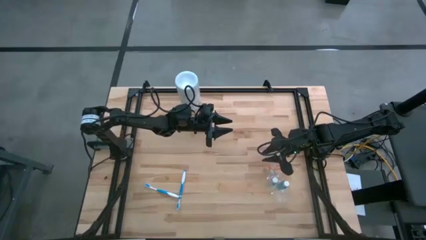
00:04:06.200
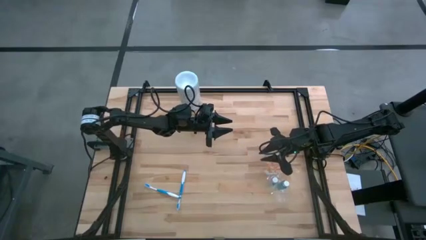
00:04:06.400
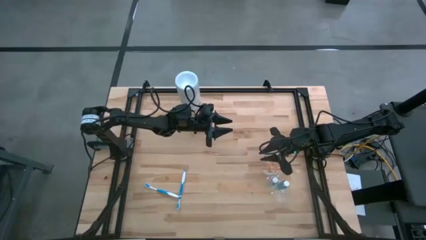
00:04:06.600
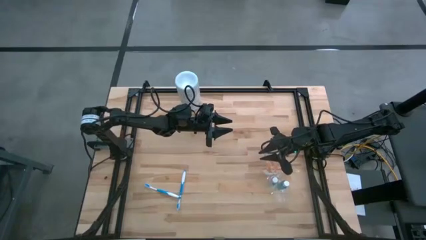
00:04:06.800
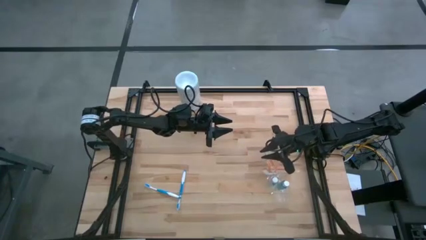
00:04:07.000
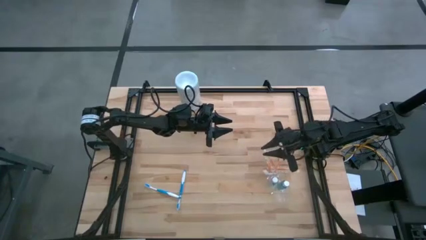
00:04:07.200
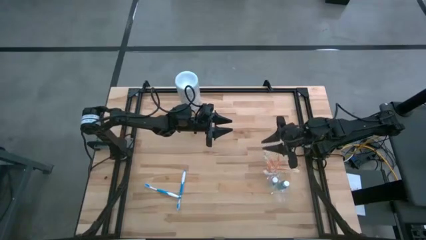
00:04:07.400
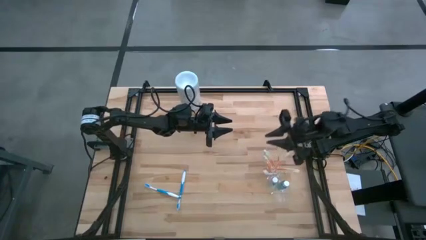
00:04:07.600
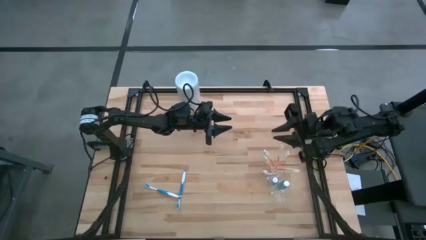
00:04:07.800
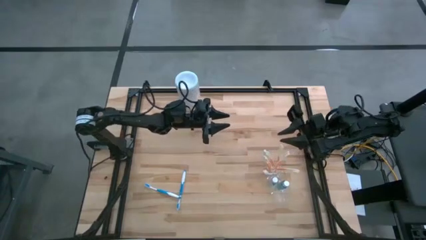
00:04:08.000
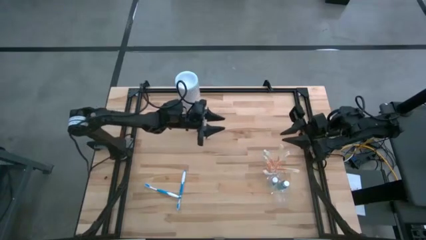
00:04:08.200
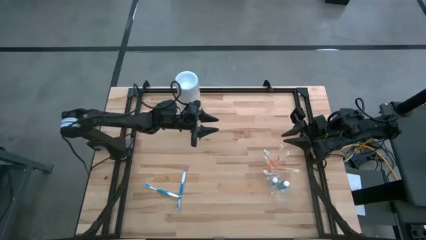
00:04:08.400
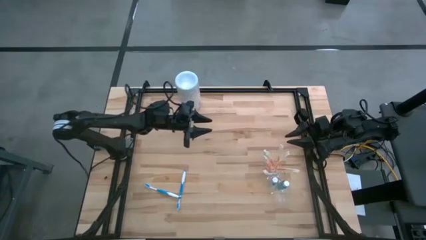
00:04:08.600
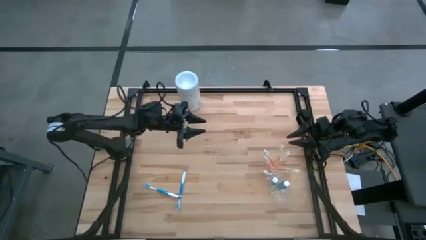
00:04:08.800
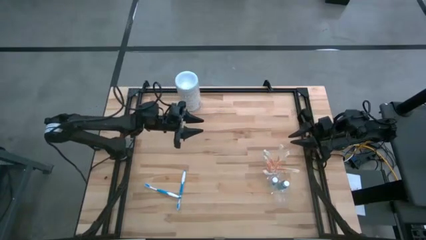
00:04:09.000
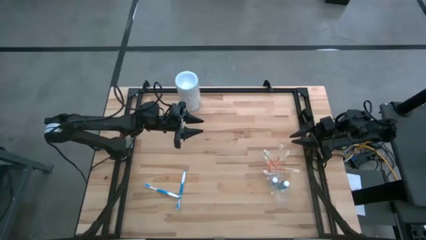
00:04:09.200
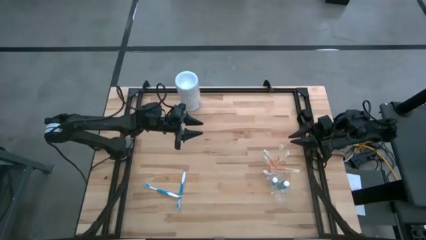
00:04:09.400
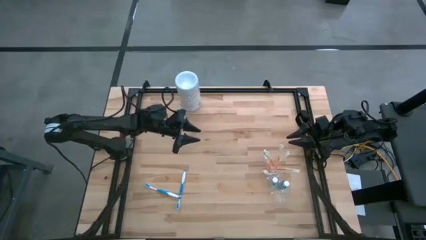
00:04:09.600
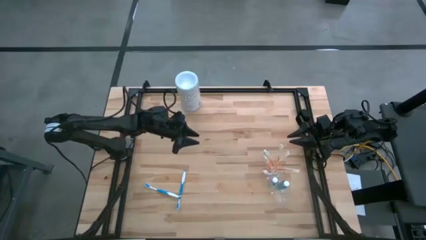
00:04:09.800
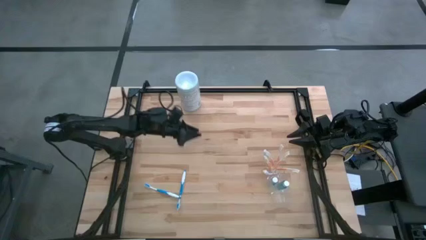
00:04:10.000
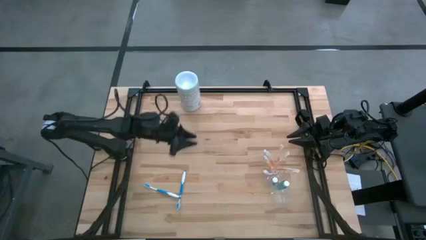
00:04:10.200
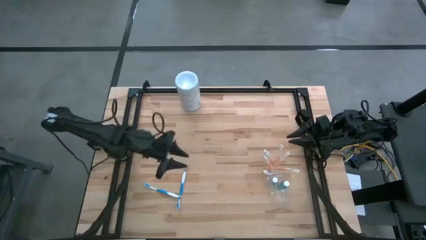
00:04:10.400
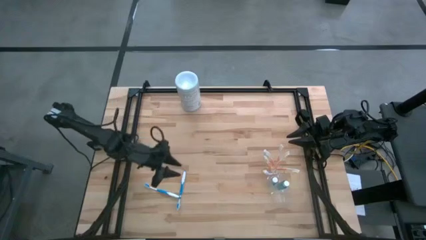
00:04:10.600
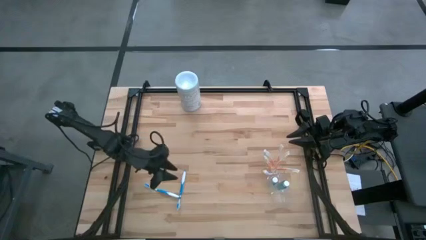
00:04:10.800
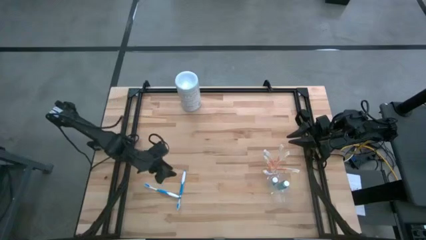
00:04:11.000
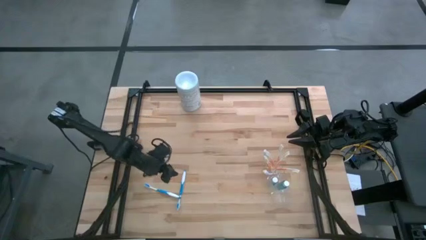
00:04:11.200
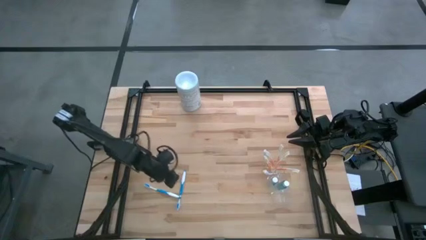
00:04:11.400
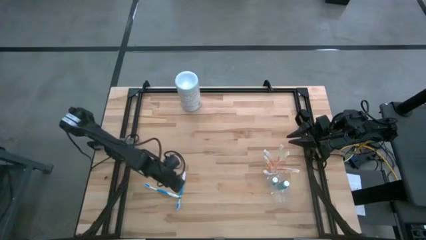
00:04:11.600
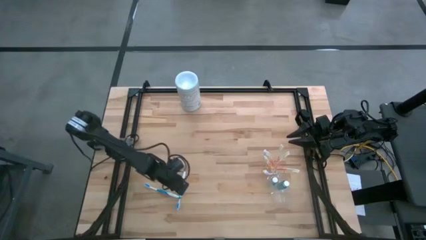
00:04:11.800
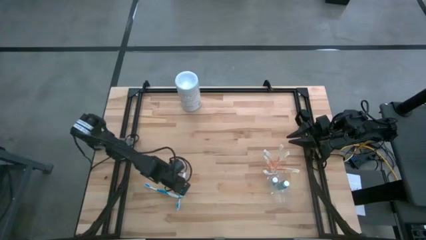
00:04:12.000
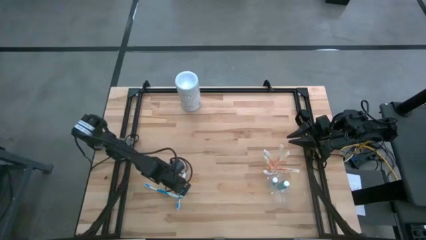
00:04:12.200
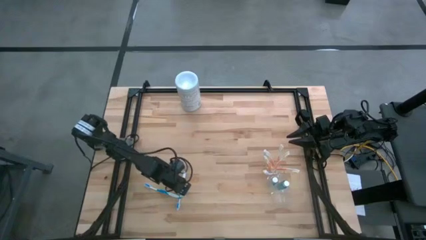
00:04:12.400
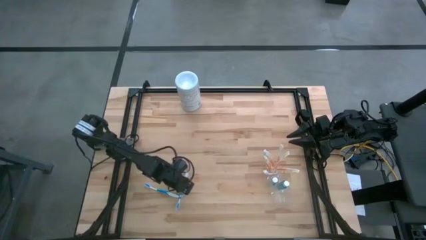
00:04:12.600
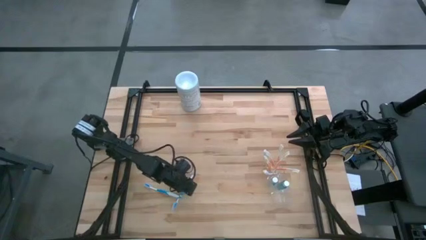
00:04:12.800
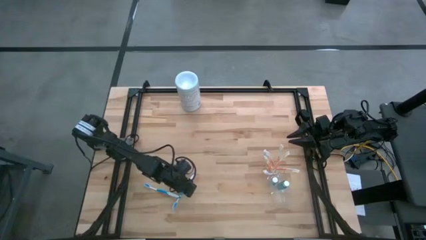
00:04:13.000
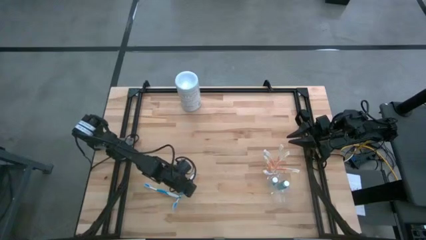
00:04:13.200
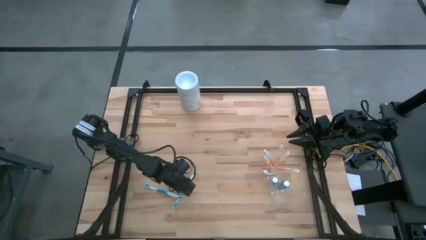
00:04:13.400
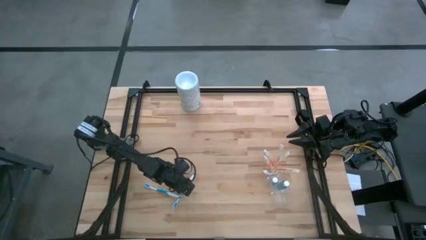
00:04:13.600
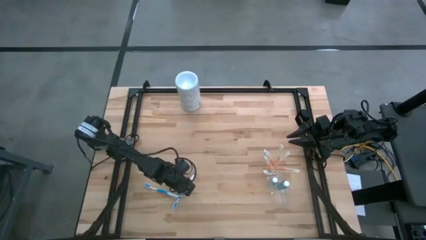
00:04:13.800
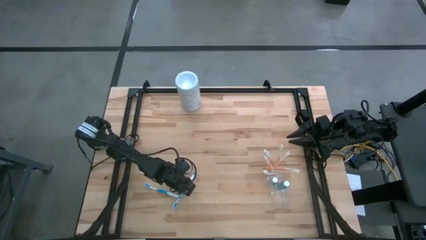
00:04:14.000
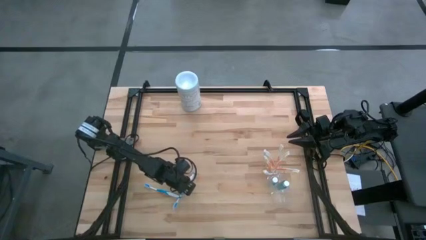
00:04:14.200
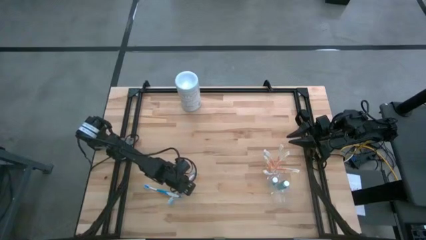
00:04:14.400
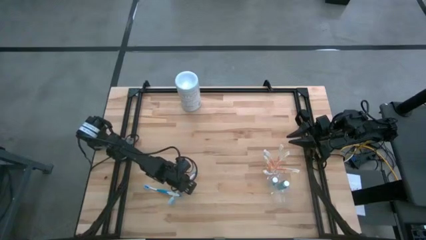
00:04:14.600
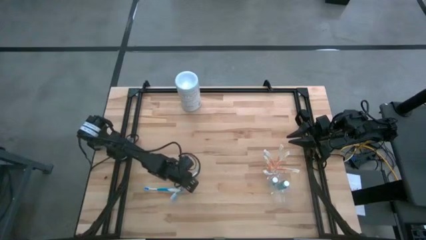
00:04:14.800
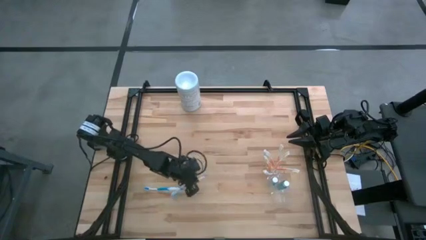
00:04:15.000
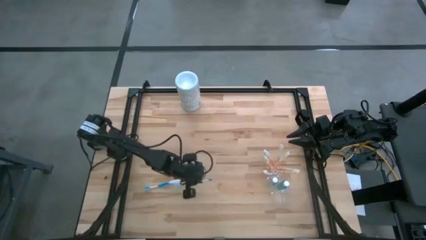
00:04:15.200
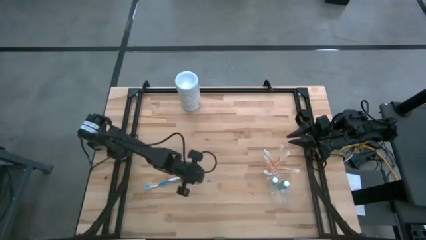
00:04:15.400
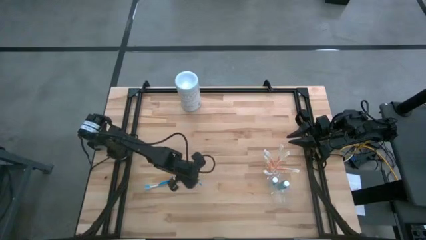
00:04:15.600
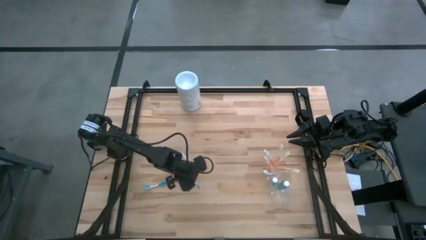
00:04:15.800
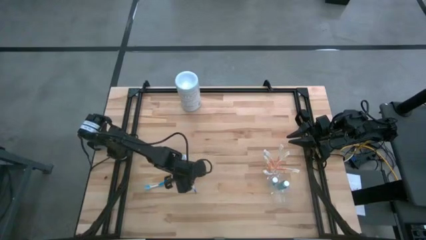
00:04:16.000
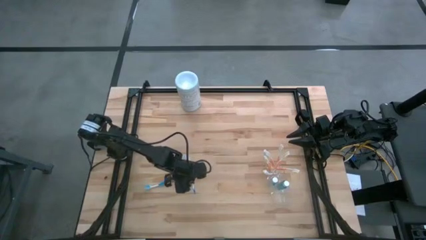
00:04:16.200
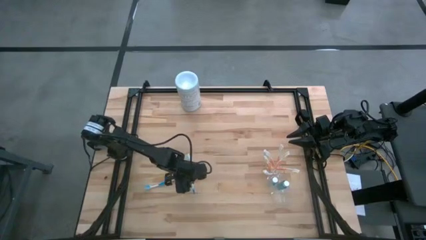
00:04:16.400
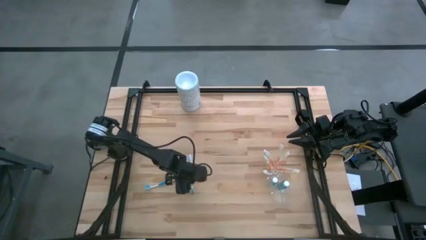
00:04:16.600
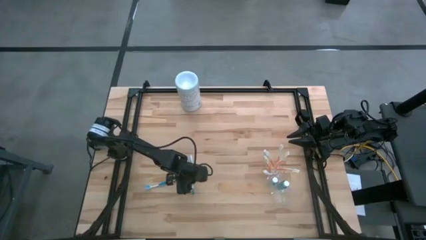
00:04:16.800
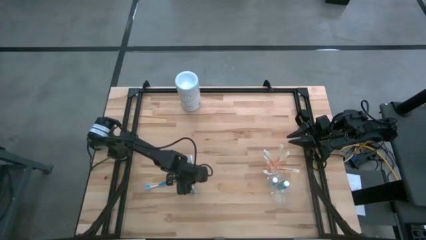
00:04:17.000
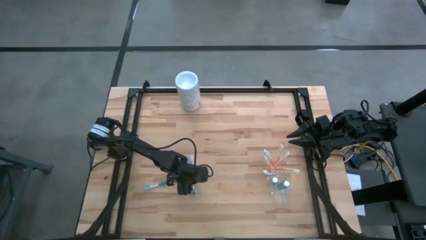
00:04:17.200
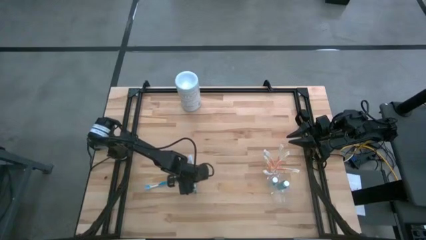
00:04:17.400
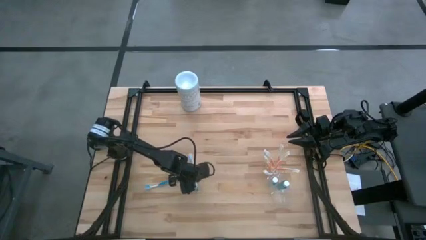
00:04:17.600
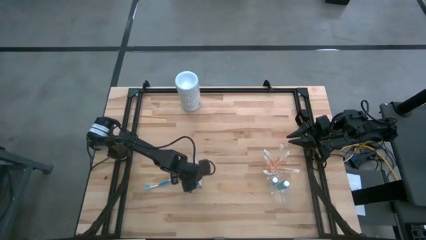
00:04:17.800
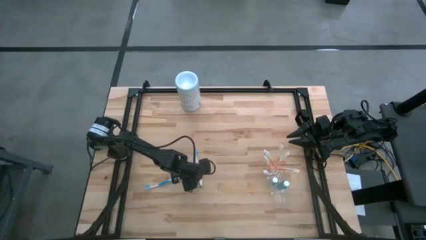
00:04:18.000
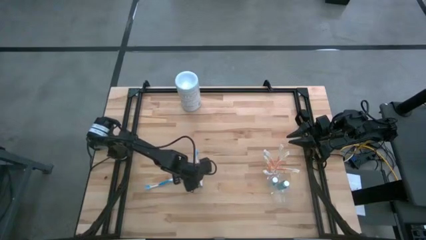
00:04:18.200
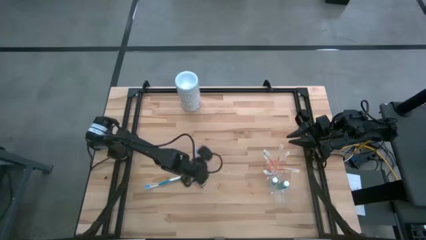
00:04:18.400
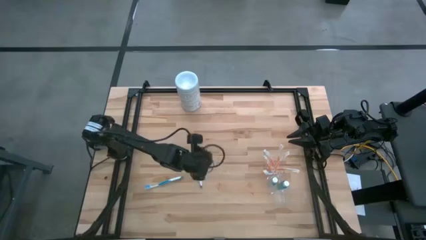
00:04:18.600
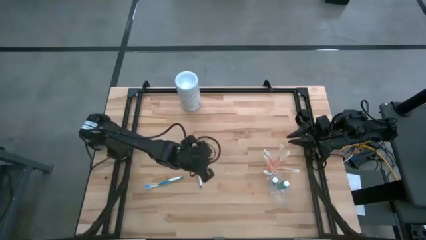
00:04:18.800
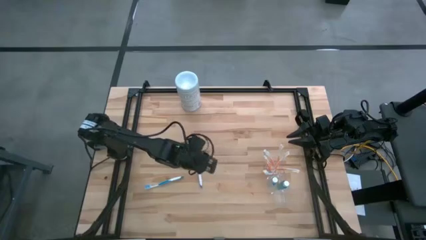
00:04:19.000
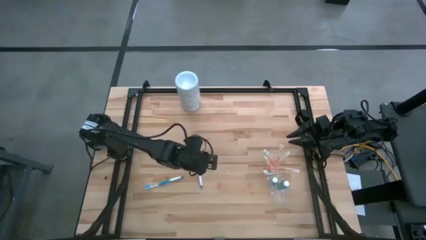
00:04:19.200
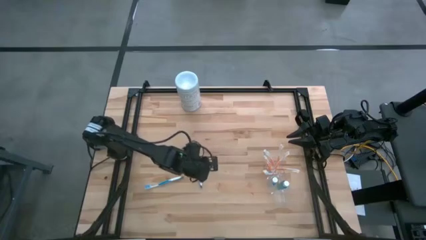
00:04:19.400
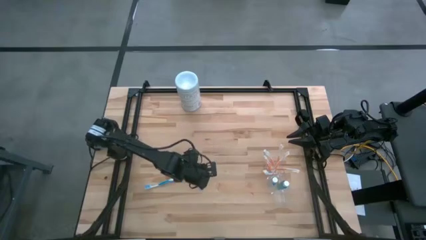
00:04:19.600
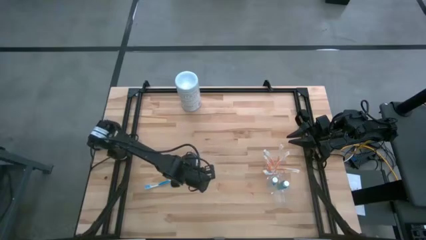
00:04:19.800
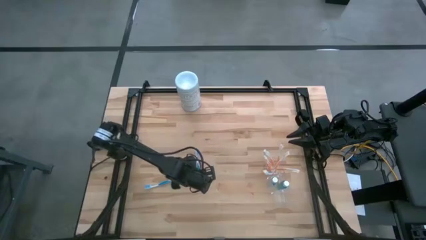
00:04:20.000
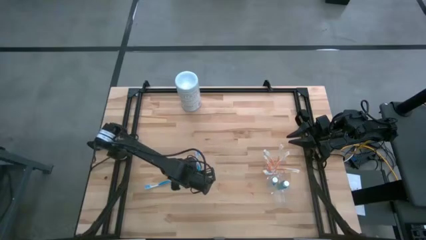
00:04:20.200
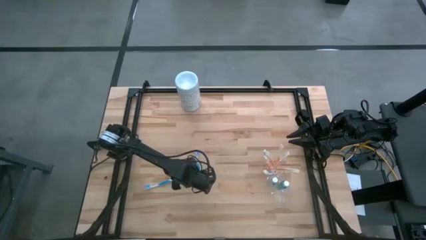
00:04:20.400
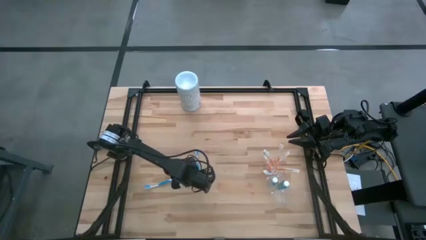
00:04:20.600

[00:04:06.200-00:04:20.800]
Task: Pick & Place toothbrushing station
Put the blue toothbrush into the bottom section of the transparent organizer

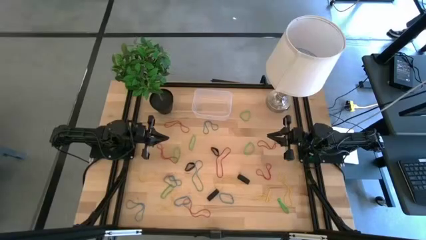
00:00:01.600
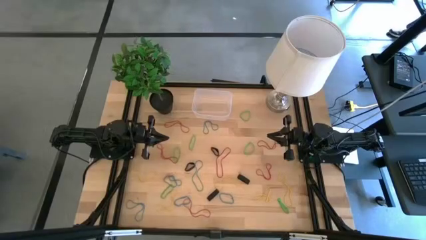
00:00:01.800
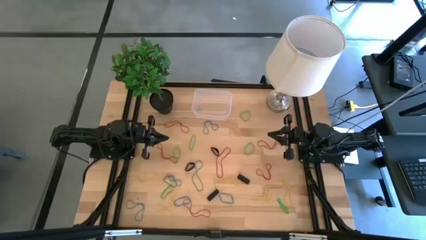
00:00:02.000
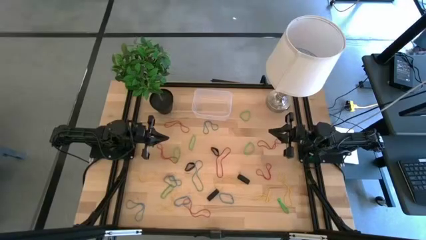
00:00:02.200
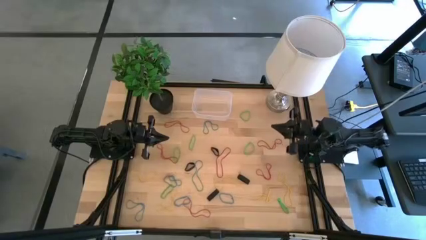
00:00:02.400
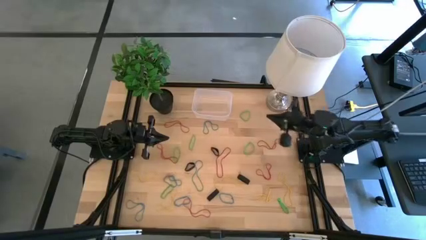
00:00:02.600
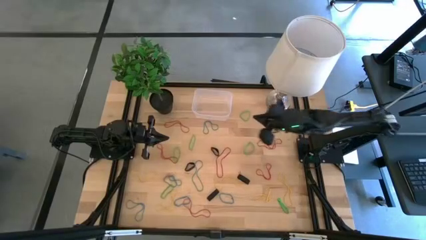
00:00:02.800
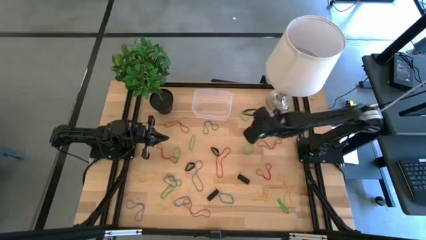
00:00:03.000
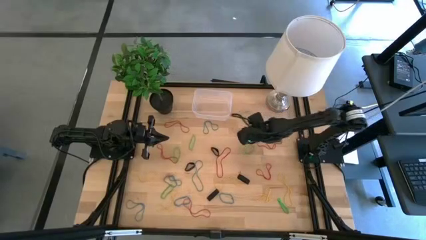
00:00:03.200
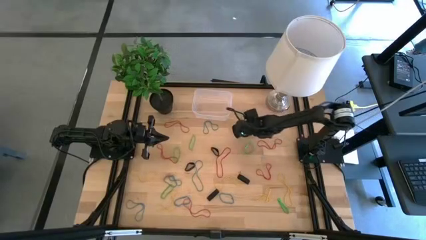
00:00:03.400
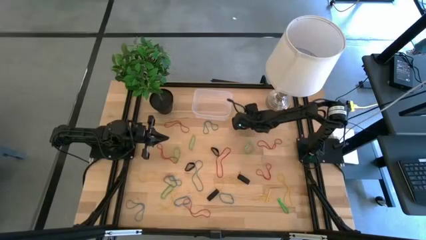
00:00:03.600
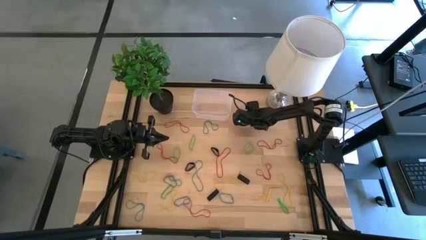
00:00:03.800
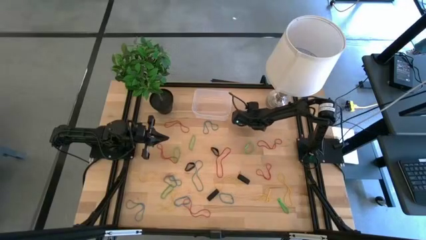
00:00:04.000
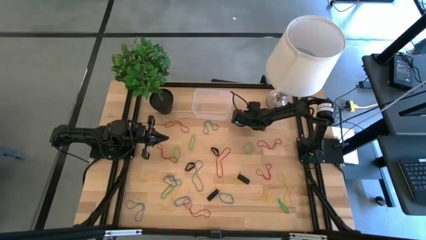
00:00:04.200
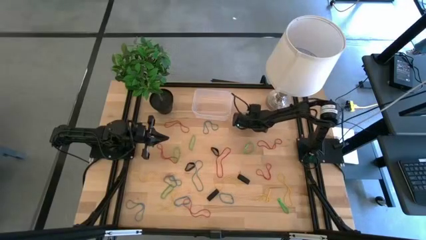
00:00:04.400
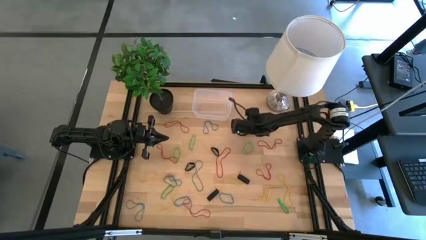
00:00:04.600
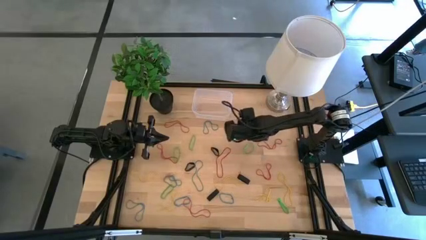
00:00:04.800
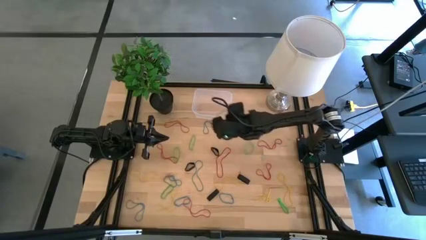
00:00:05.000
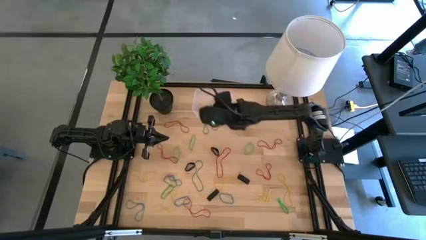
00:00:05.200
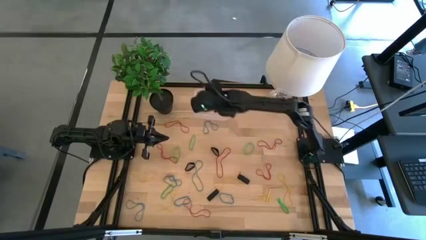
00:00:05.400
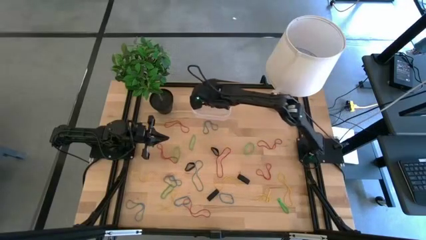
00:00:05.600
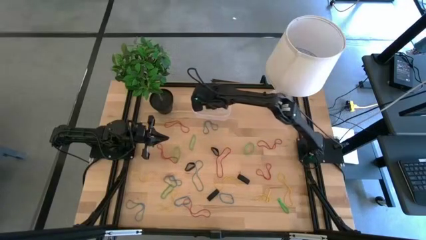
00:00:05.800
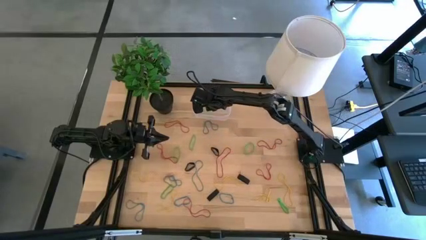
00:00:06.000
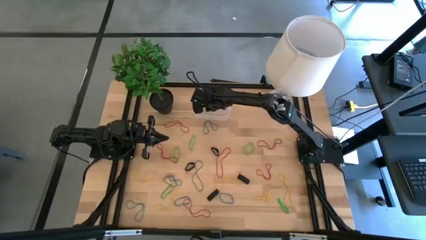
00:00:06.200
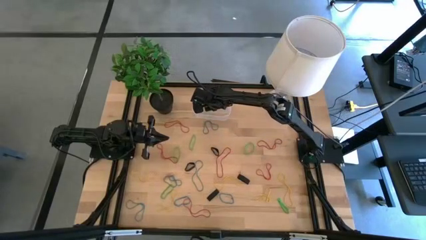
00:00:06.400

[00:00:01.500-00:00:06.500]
Task: Pick and place rubber bands into bin
Put the green rubber band into the transparent bin
